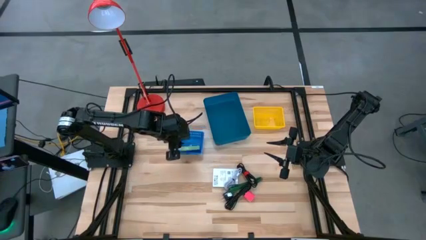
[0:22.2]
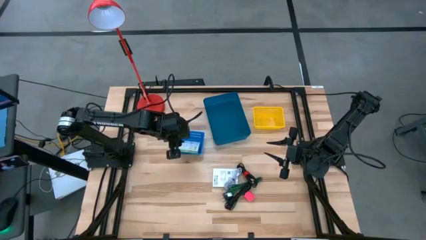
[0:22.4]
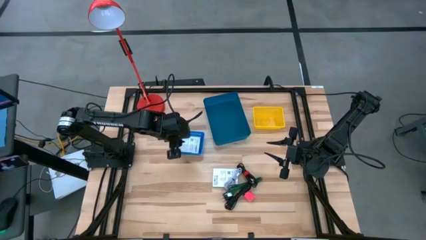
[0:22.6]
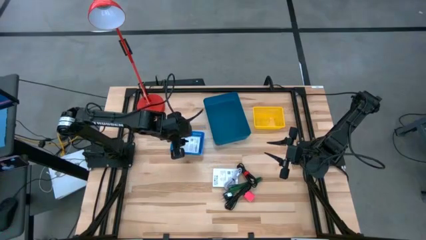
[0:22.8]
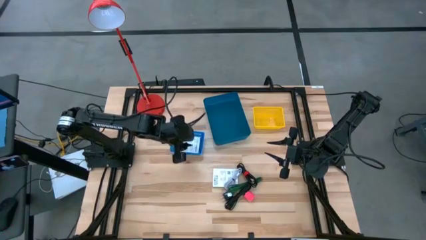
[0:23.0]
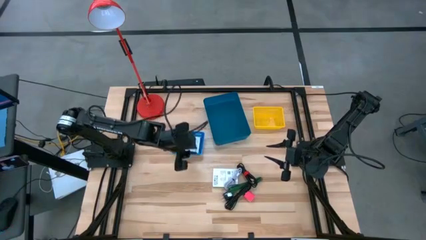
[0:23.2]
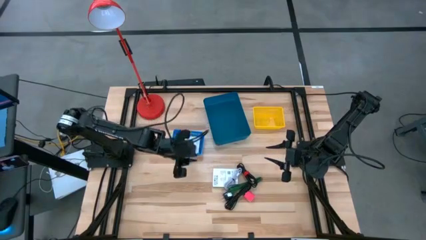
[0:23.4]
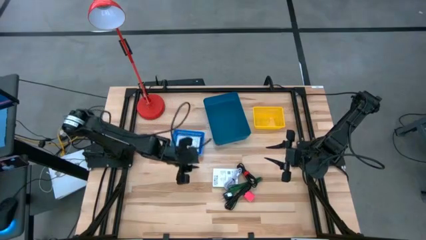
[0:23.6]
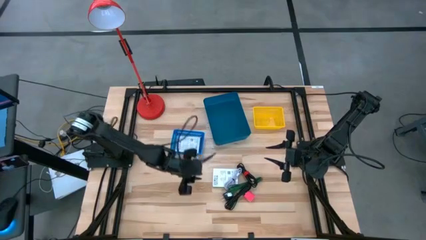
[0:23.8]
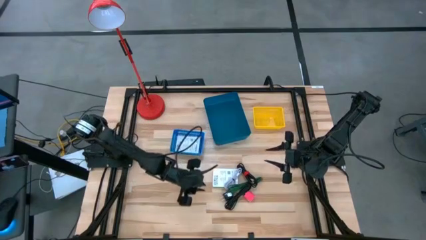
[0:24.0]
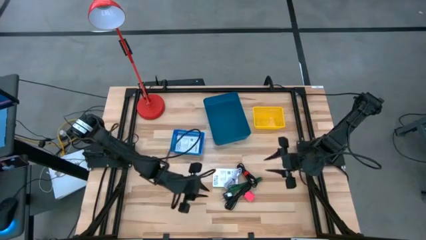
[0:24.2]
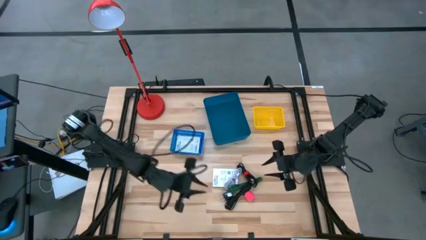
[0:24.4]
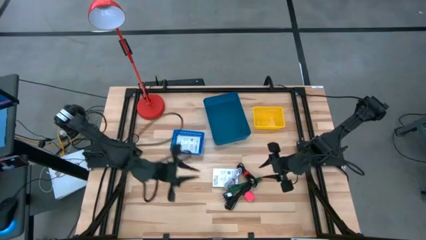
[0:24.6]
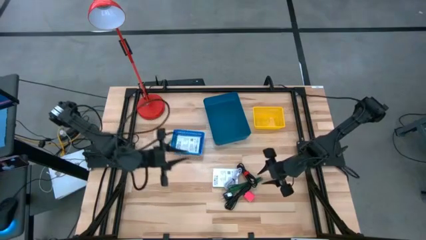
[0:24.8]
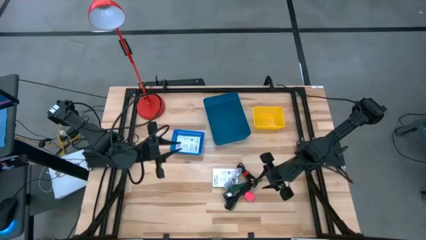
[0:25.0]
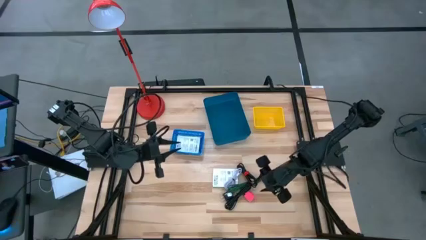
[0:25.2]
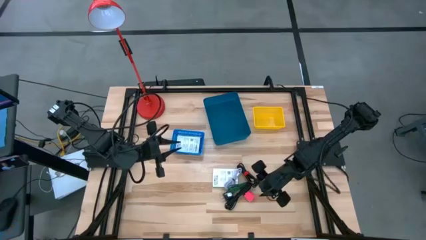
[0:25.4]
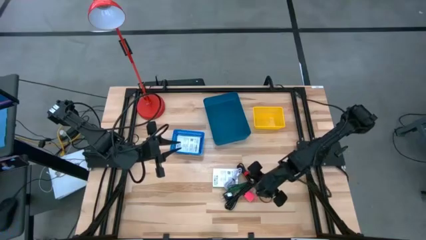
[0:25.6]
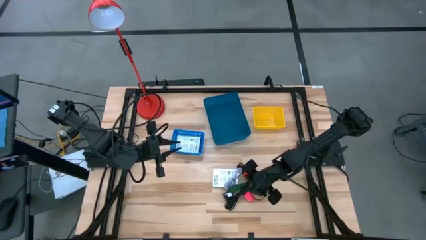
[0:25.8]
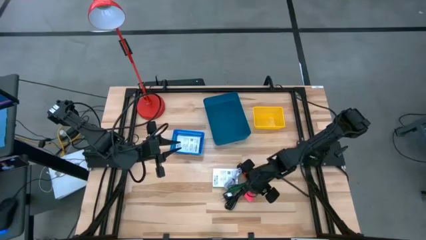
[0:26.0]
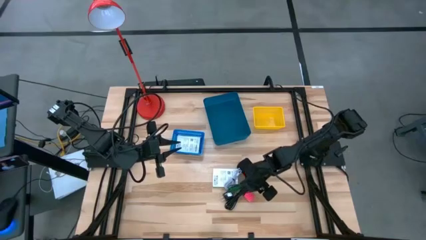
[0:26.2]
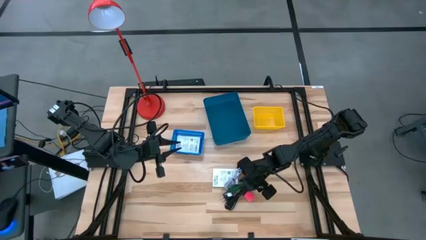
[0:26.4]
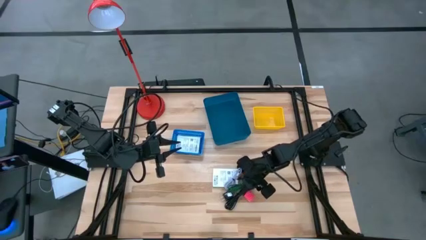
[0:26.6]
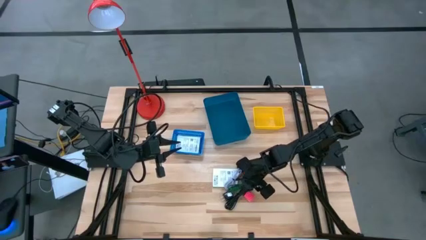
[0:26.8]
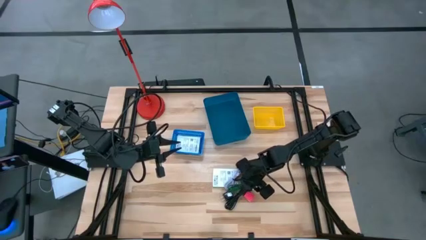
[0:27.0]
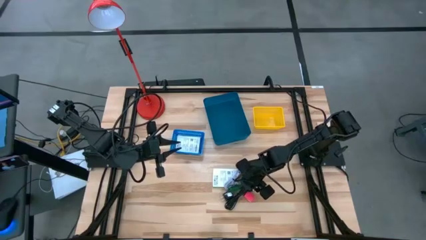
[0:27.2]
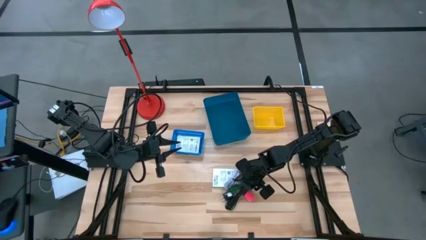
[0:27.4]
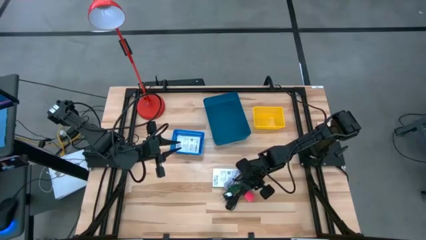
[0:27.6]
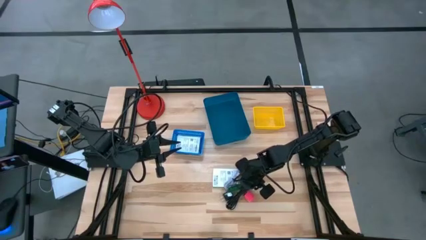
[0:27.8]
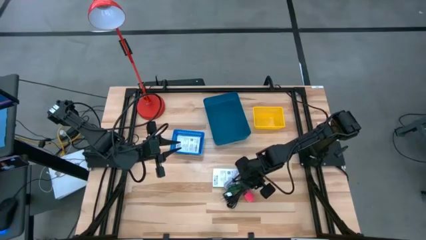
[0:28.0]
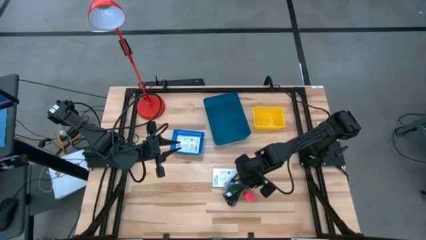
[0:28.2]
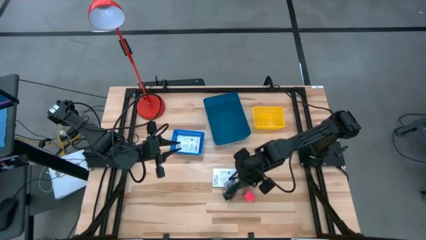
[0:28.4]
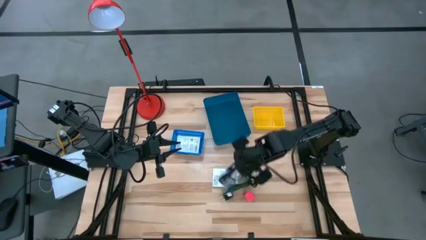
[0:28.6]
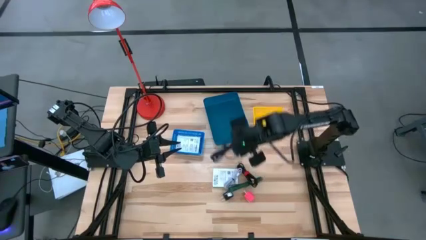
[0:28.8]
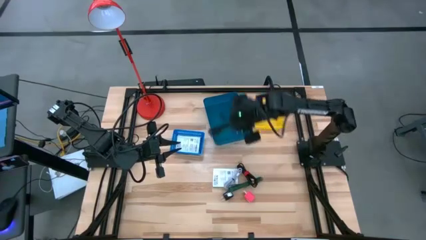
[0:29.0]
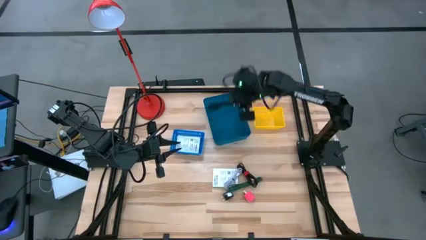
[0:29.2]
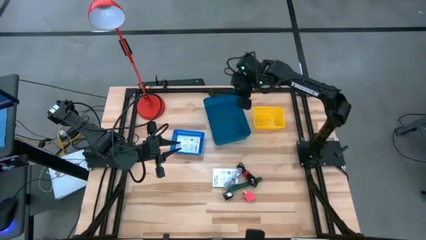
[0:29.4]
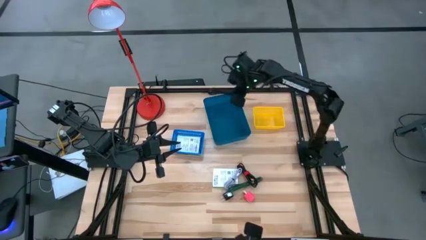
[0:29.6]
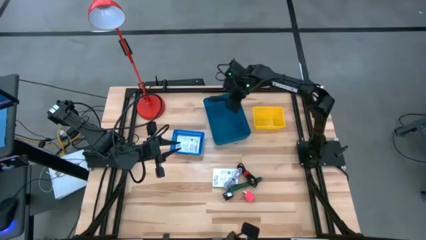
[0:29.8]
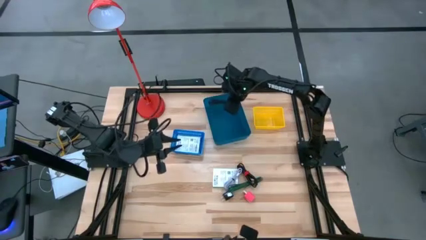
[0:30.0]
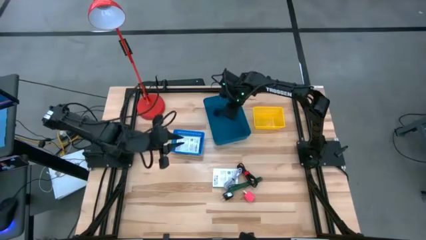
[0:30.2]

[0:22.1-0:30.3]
Task: Pick and place items into bin
Put the black charger cable into the blue bin

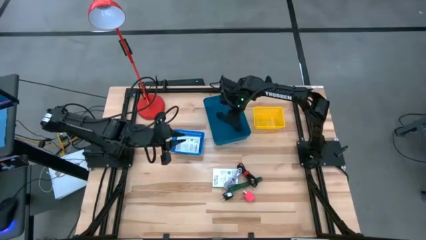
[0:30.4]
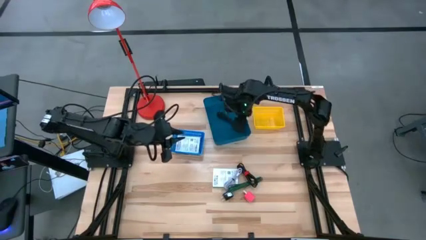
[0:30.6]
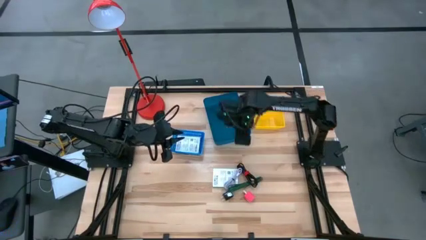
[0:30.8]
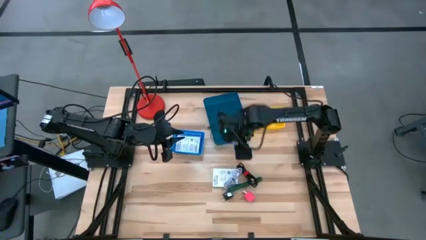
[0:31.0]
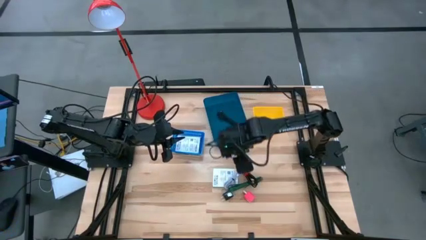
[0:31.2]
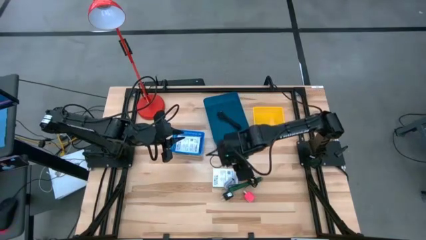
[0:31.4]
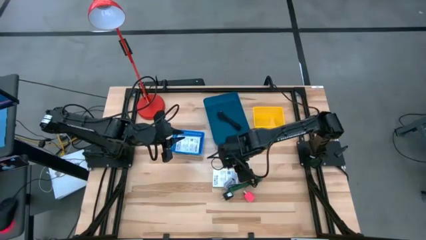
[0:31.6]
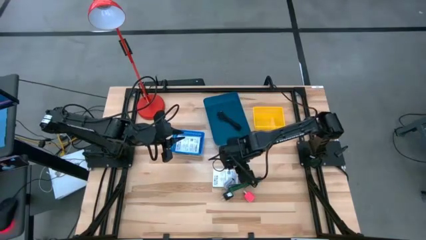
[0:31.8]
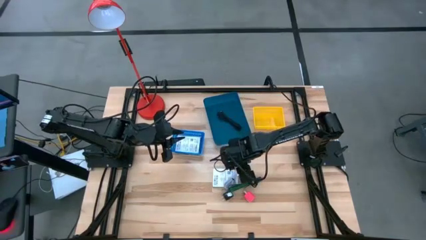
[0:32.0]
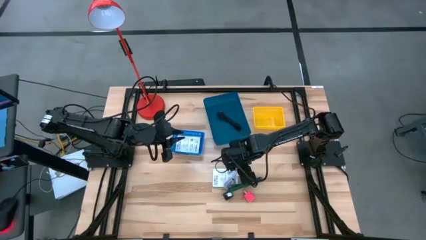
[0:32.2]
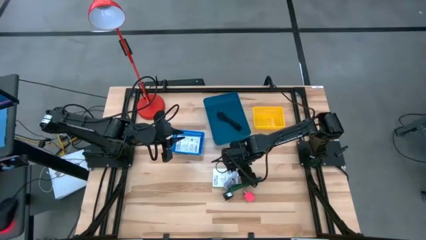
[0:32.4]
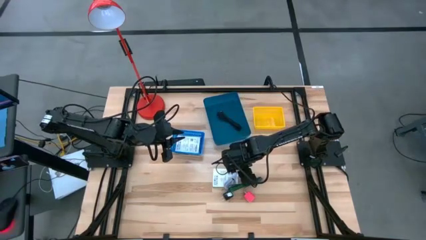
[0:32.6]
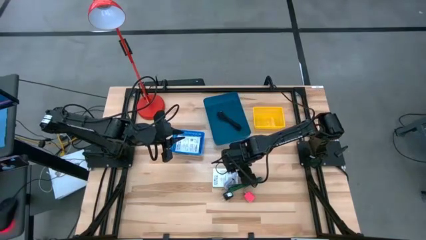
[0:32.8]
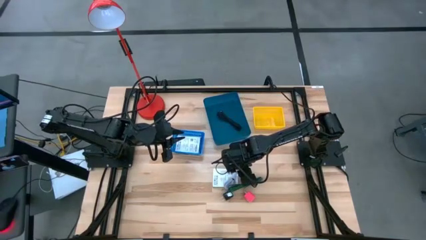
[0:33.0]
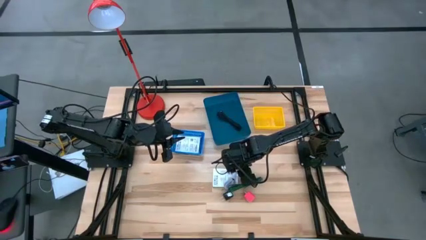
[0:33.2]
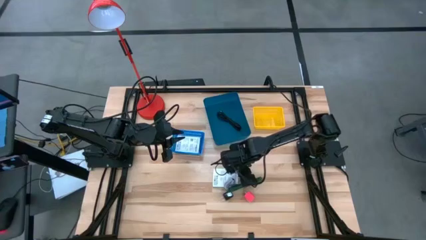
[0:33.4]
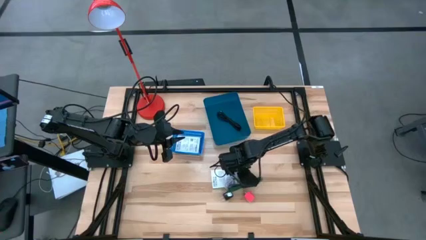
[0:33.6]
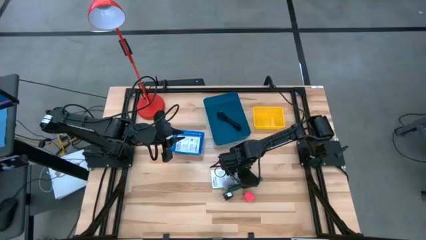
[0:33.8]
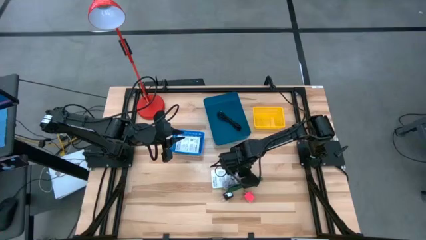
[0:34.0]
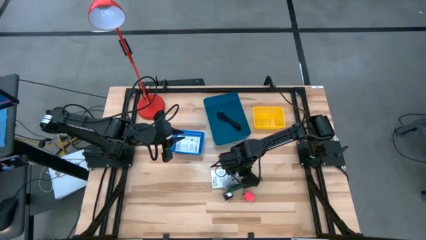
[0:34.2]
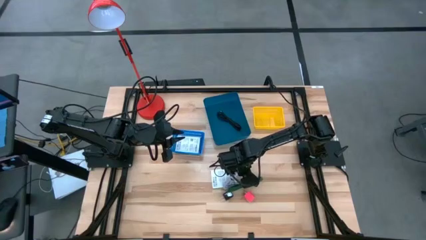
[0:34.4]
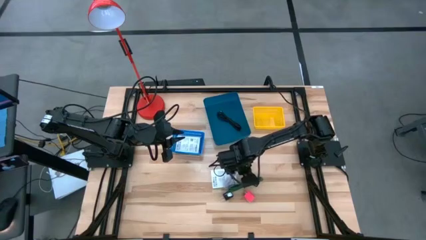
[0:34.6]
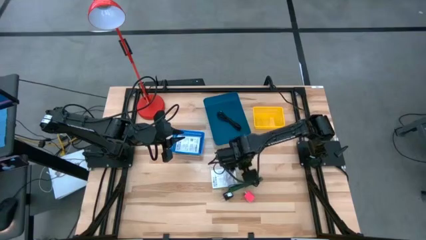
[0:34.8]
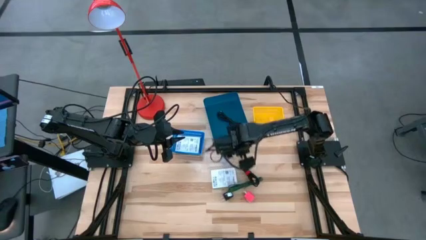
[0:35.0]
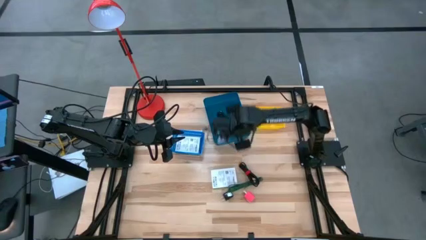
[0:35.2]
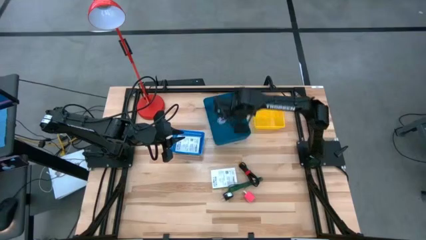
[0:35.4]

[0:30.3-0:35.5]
Put the white charger cable into the blue bin

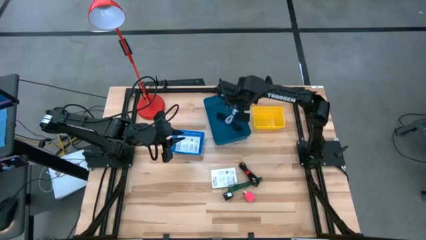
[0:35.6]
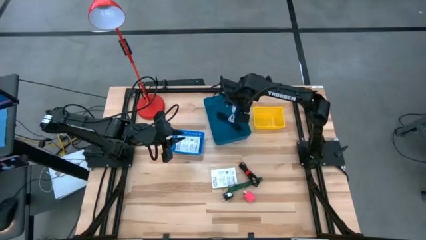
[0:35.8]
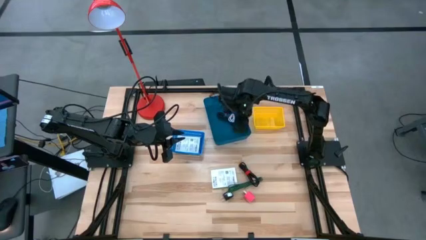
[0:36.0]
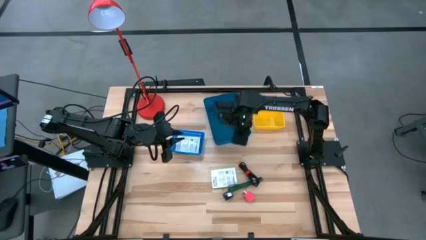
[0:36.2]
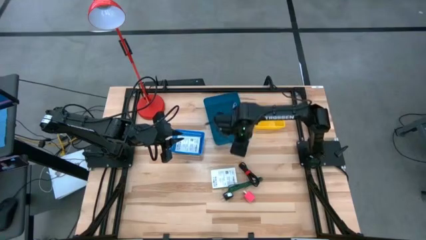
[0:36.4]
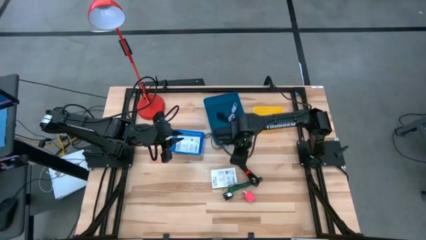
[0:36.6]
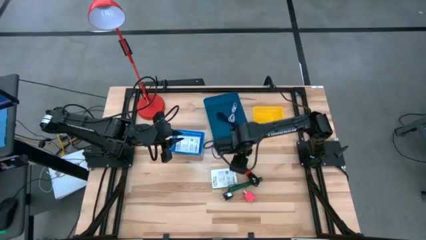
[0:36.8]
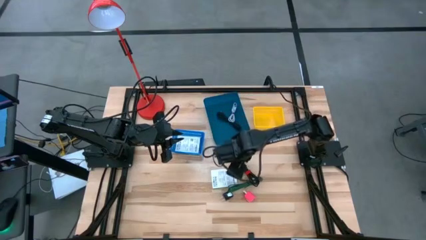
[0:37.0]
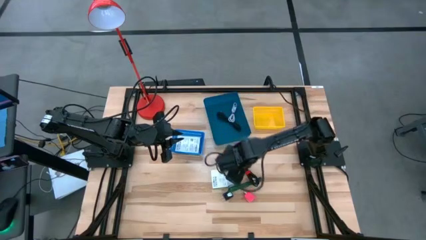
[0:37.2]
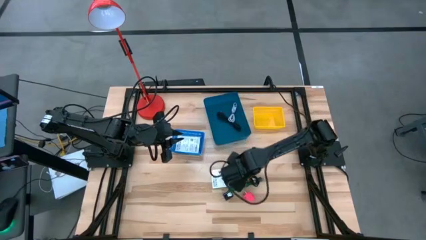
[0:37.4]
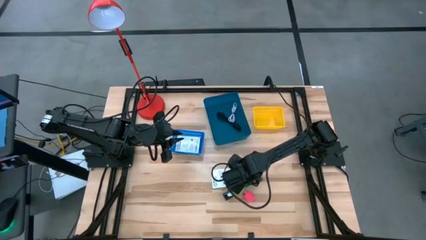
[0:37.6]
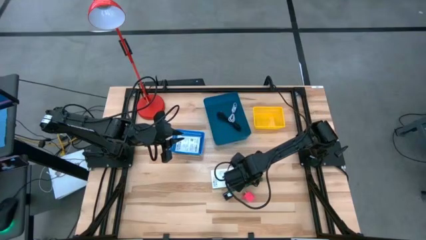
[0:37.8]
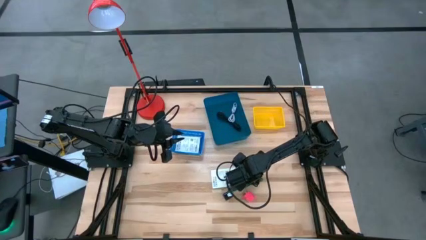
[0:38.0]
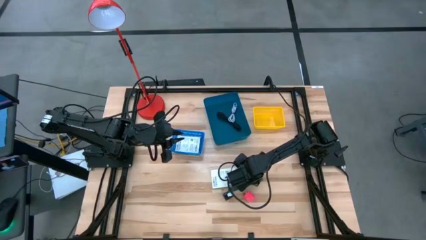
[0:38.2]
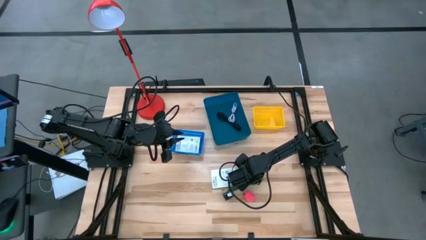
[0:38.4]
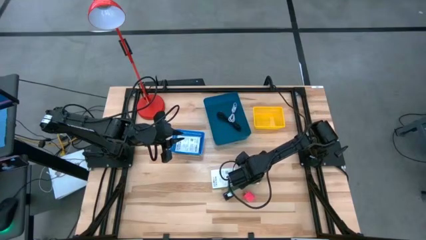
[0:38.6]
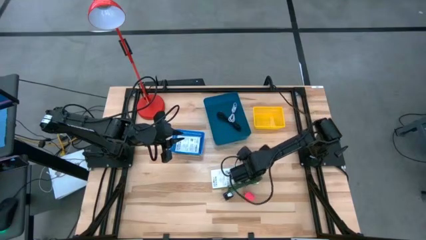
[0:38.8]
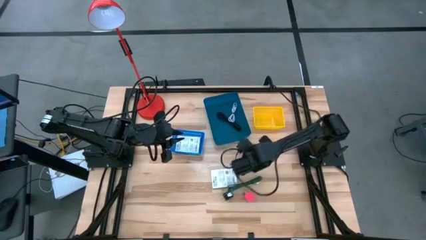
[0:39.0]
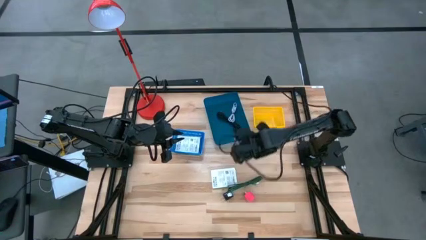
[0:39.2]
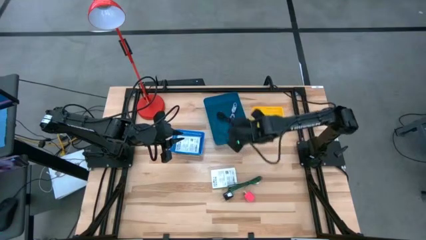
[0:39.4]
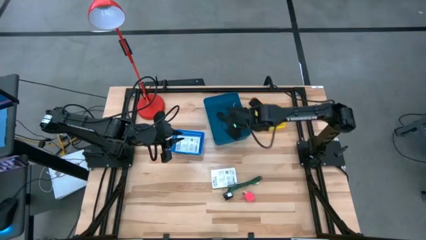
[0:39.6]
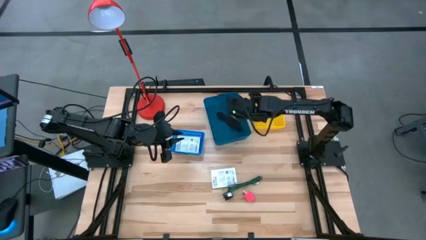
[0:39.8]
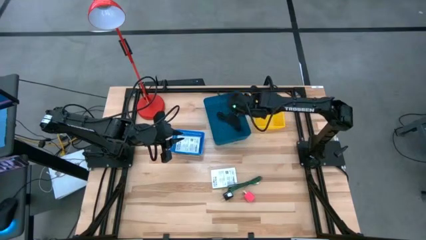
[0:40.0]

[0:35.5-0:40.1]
Put the black charger cable into the blue bin
